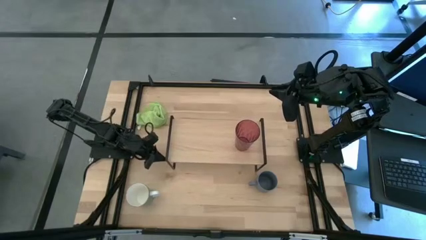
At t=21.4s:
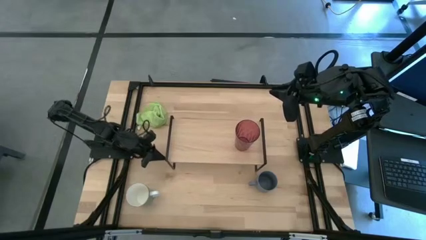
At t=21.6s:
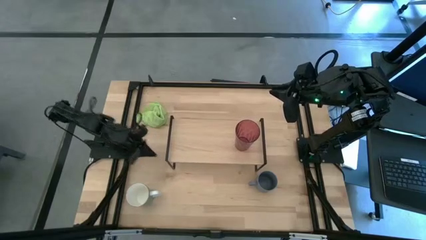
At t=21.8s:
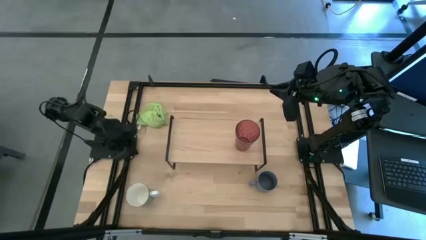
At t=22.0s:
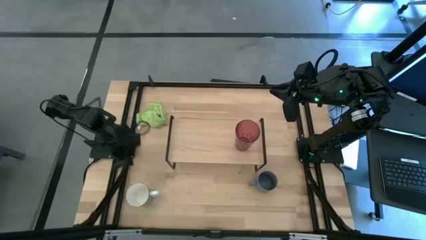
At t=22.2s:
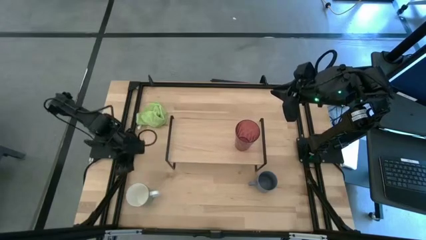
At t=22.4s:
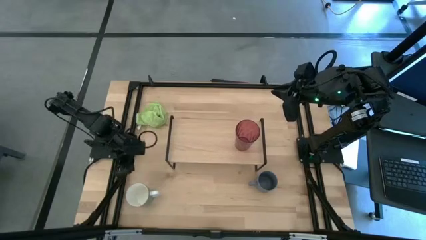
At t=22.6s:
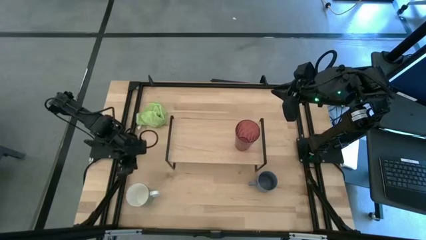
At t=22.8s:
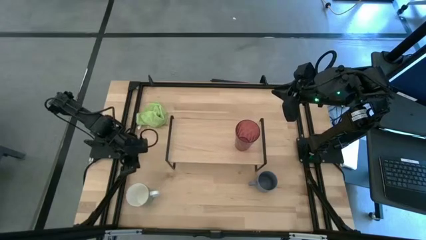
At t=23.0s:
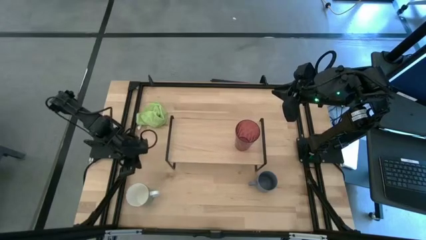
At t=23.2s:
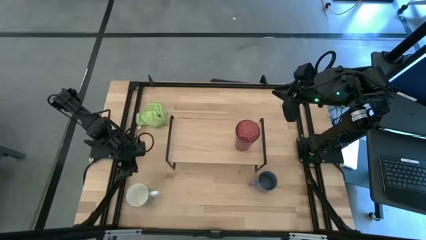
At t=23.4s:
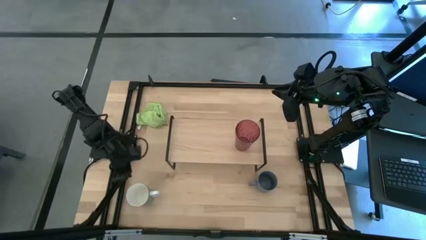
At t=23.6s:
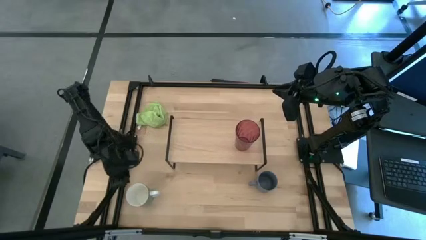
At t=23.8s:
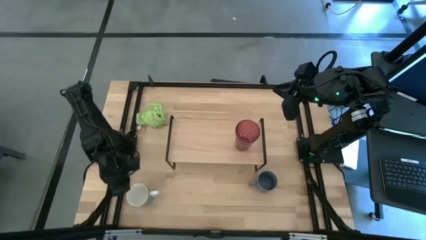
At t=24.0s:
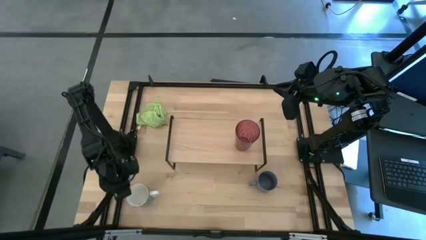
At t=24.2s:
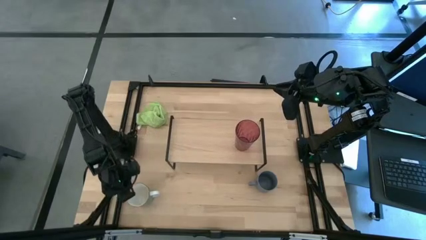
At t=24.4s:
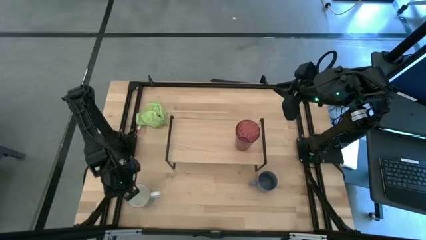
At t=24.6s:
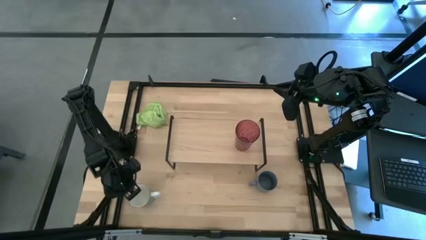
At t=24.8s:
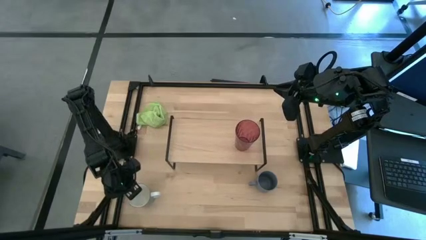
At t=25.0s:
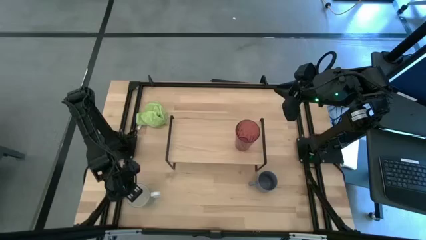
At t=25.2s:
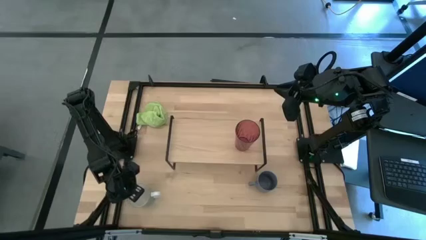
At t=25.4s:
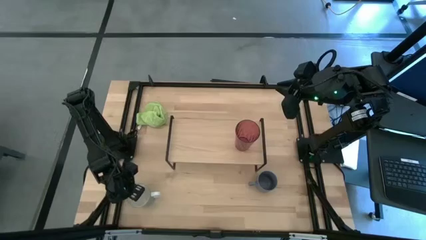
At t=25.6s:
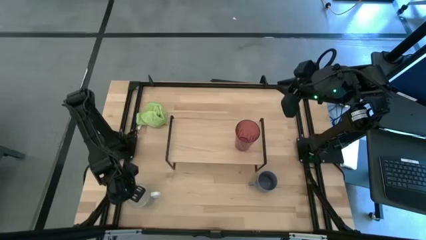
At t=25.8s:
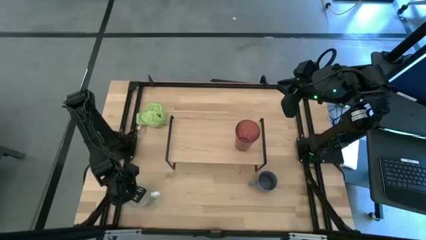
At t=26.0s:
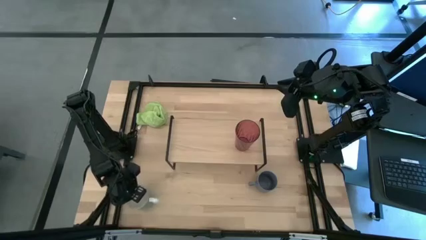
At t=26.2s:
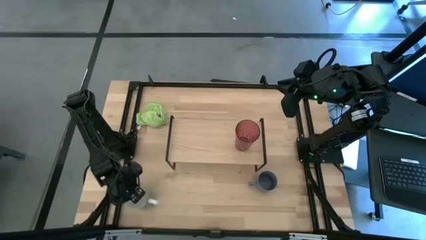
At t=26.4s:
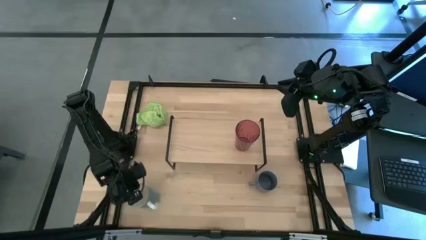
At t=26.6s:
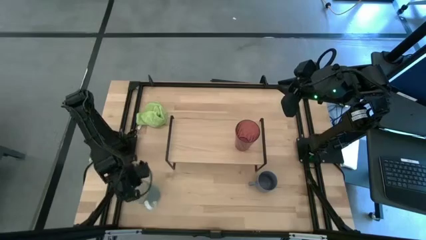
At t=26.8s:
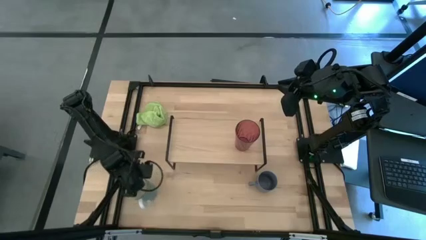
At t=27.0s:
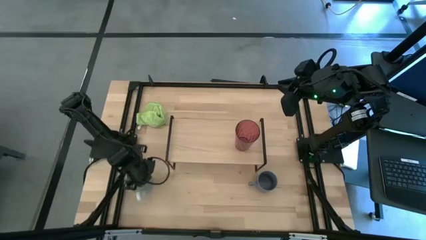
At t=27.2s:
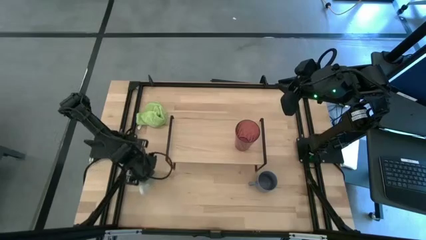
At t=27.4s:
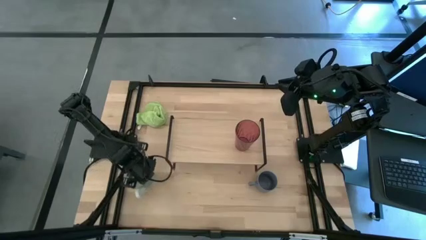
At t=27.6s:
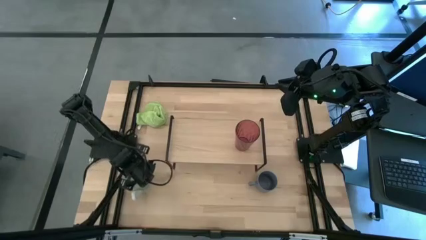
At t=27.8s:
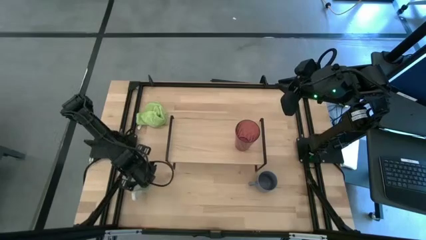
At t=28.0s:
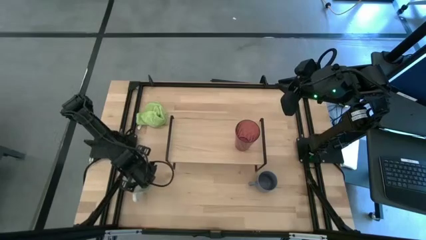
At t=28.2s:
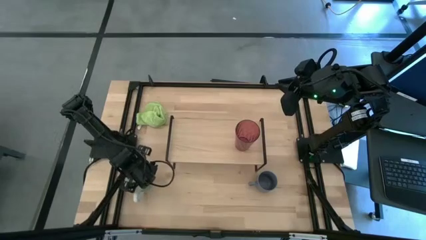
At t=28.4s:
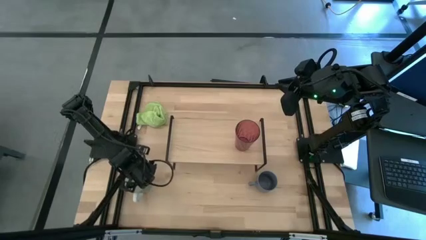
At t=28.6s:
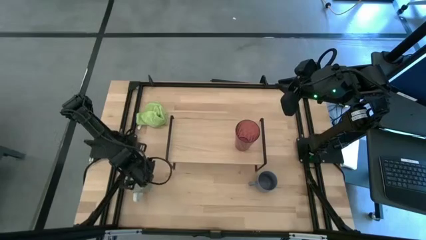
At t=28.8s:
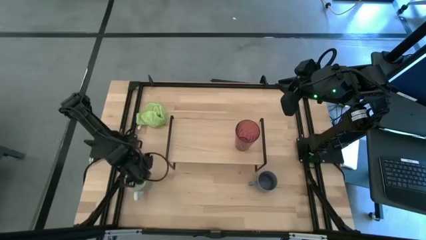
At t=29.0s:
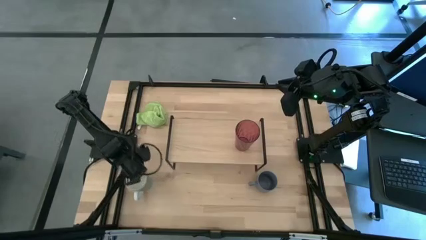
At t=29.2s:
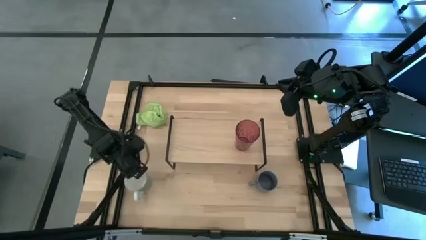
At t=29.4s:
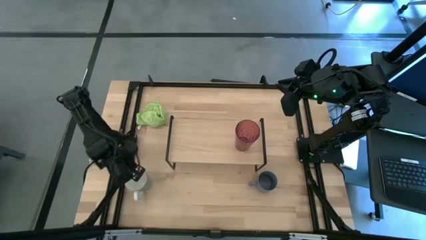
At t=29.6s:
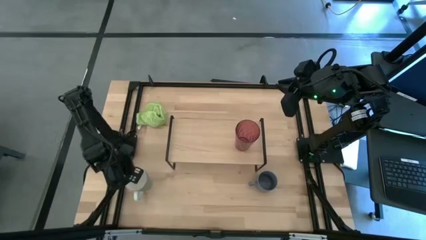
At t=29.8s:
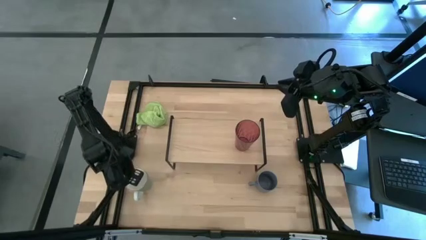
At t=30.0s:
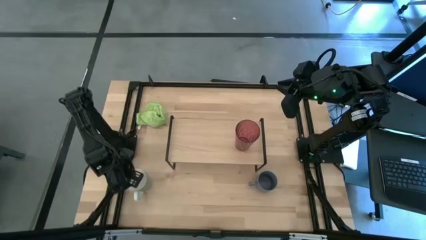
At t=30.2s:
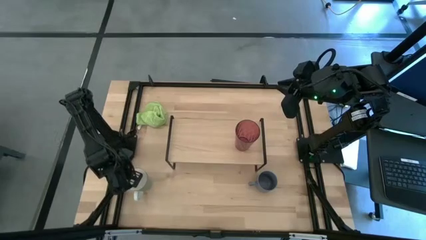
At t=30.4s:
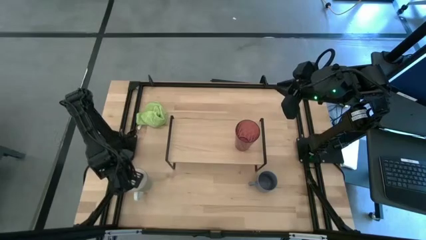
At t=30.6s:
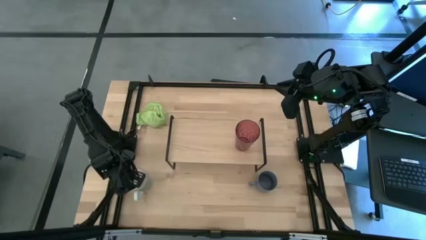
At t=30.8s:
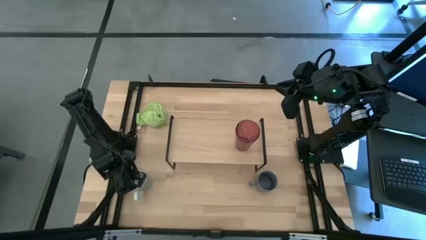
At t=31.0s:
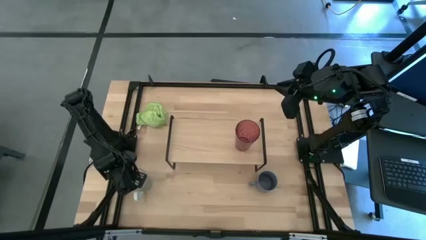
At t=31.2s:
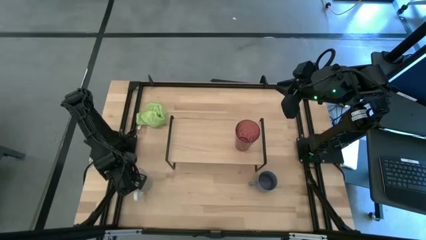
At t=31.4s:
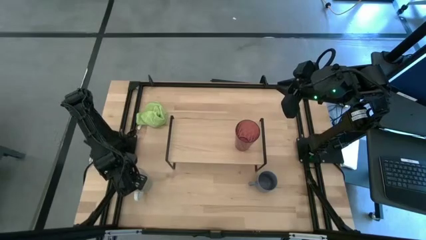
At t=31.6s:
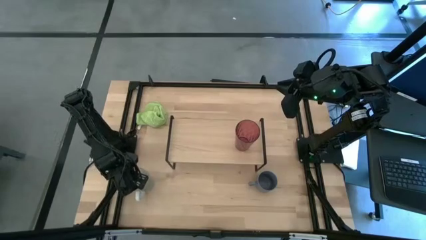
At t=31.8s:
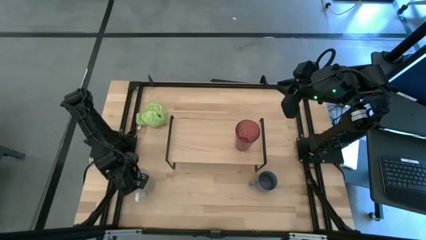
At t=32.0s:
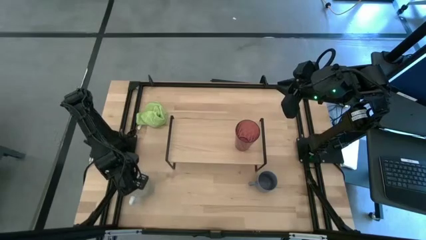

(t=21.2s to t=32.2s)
Task: Stack small to large cups/mugs on shelf
Put the white mug on the shelf
